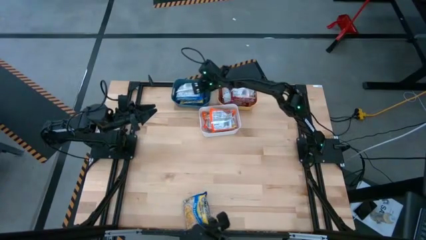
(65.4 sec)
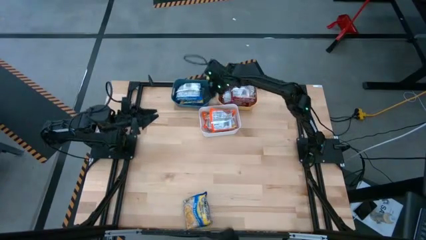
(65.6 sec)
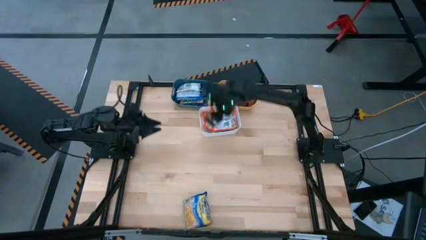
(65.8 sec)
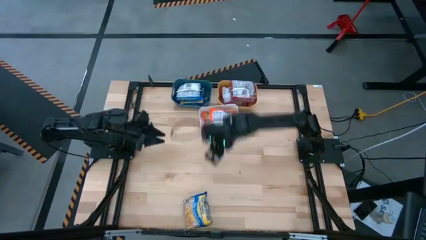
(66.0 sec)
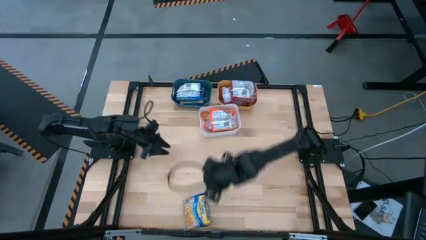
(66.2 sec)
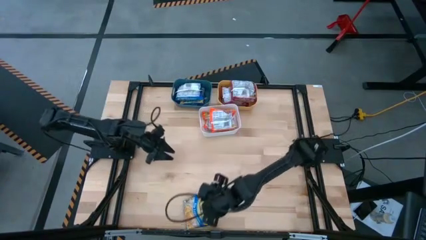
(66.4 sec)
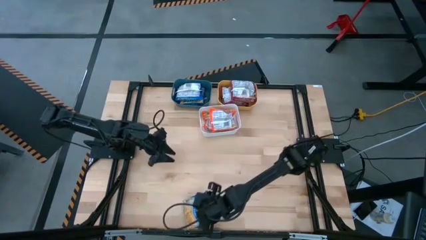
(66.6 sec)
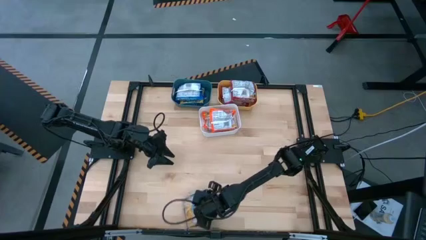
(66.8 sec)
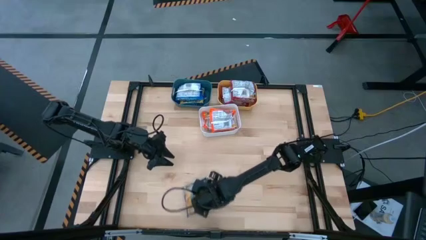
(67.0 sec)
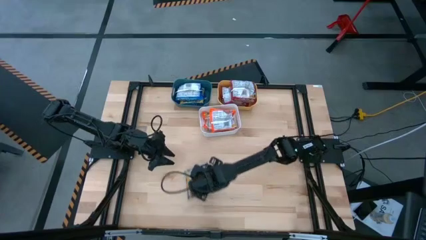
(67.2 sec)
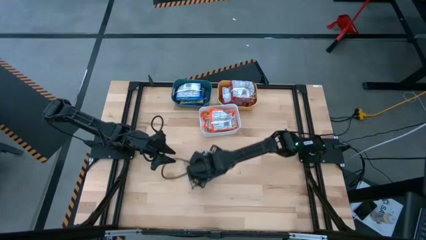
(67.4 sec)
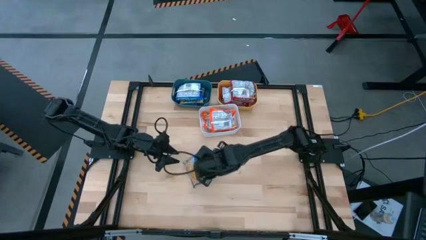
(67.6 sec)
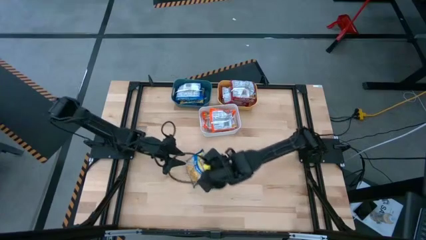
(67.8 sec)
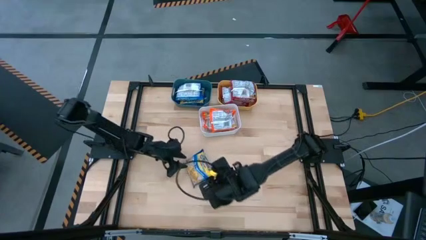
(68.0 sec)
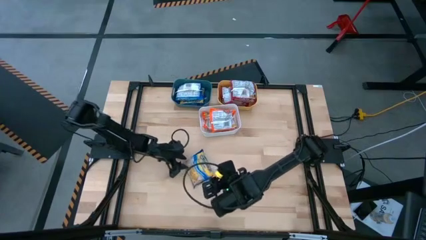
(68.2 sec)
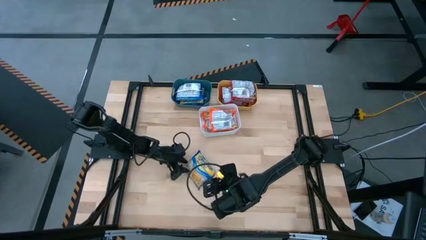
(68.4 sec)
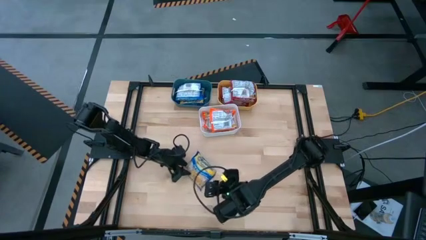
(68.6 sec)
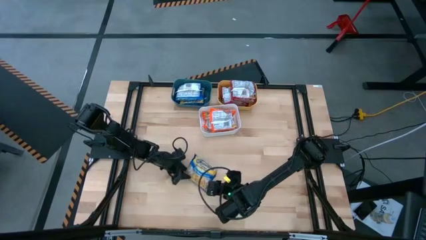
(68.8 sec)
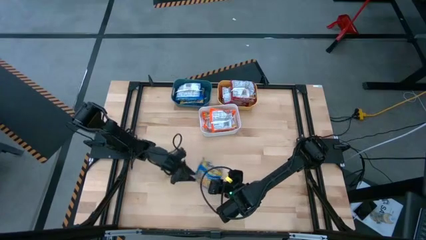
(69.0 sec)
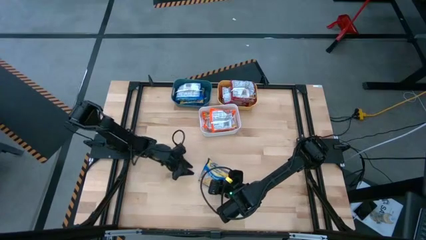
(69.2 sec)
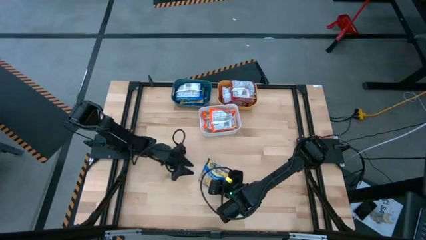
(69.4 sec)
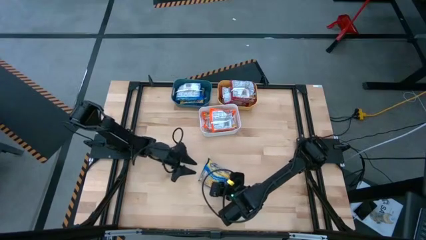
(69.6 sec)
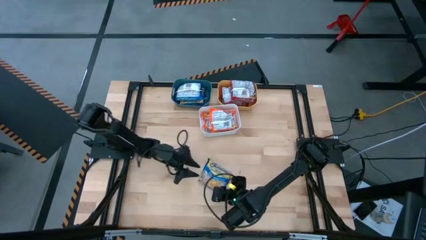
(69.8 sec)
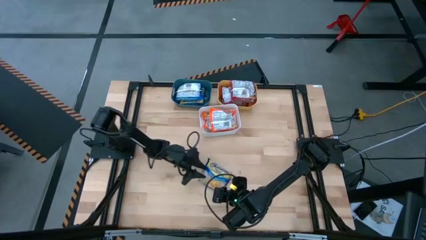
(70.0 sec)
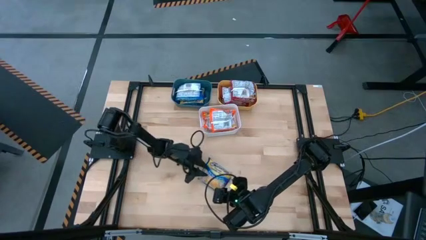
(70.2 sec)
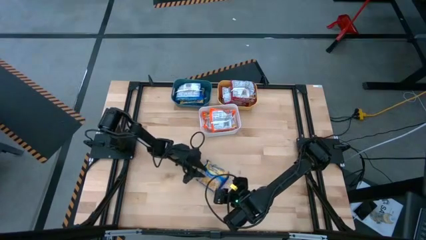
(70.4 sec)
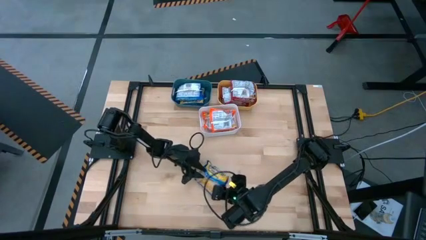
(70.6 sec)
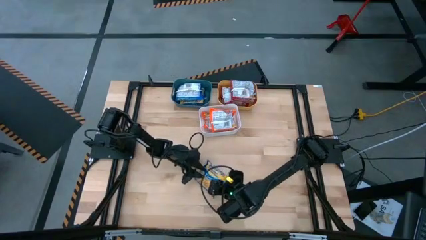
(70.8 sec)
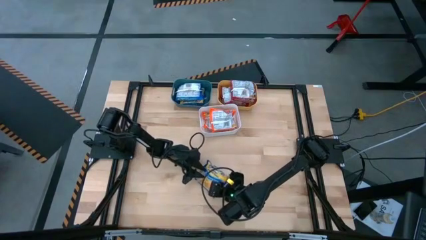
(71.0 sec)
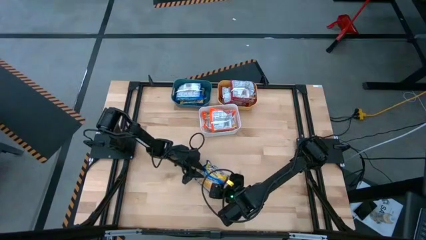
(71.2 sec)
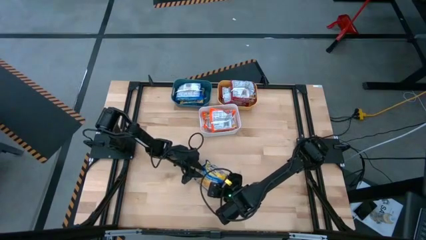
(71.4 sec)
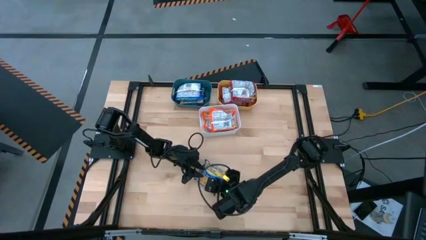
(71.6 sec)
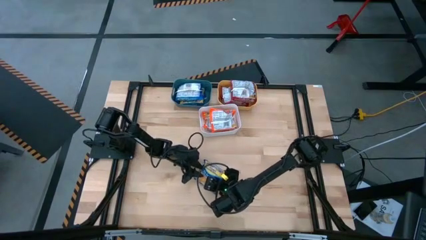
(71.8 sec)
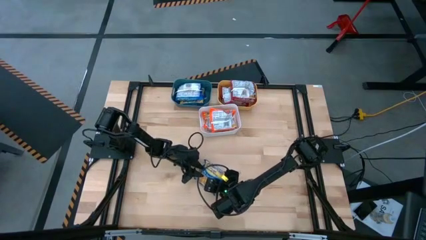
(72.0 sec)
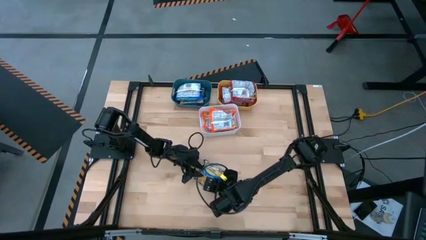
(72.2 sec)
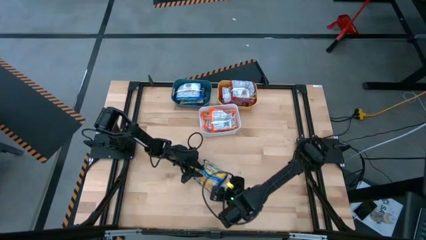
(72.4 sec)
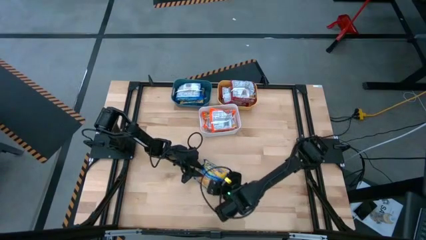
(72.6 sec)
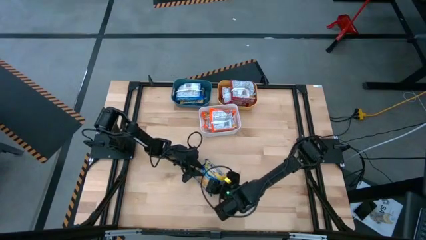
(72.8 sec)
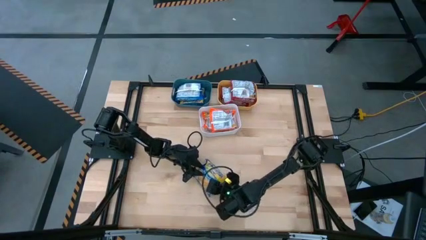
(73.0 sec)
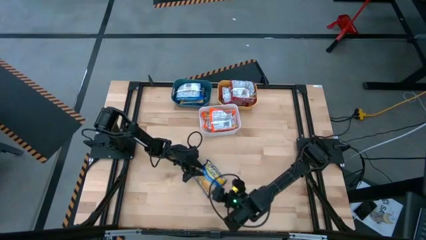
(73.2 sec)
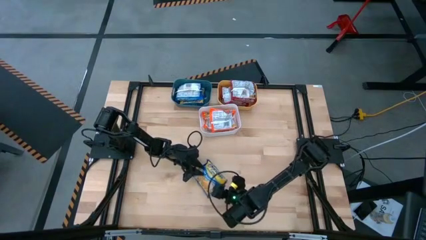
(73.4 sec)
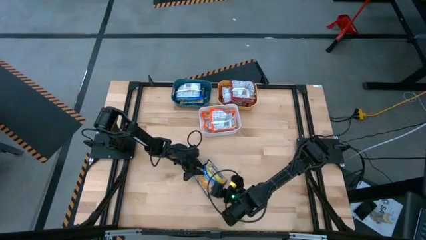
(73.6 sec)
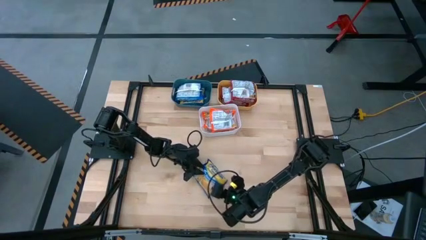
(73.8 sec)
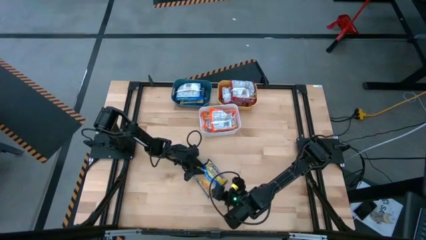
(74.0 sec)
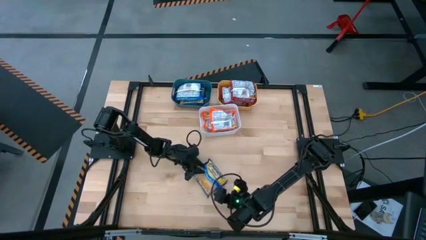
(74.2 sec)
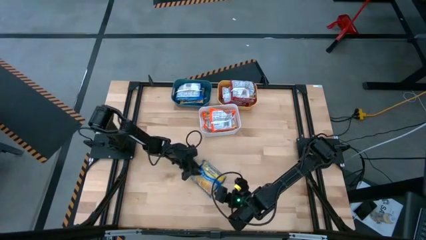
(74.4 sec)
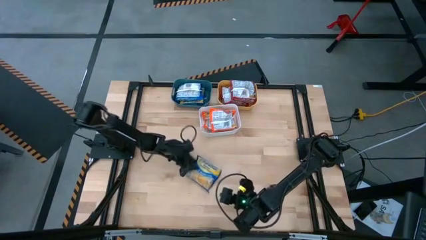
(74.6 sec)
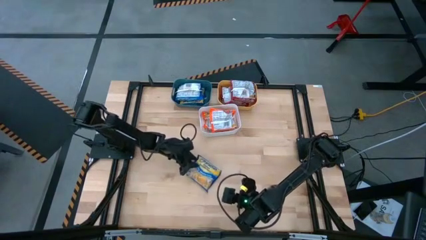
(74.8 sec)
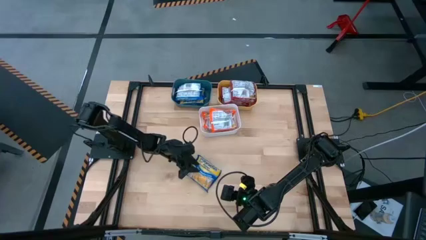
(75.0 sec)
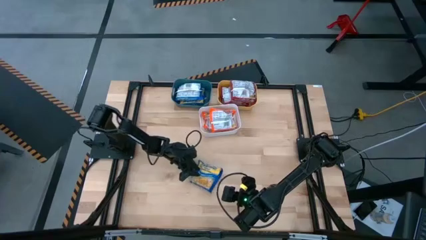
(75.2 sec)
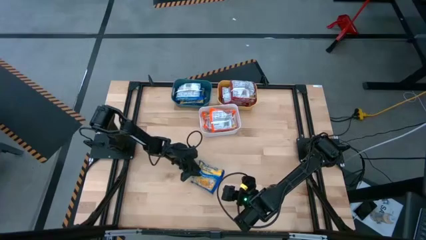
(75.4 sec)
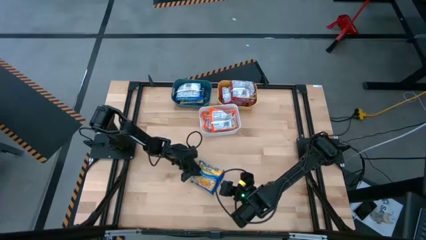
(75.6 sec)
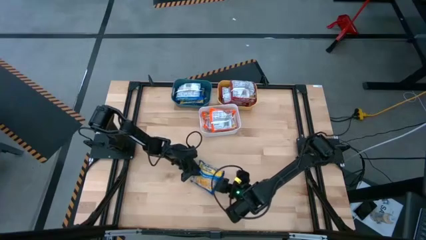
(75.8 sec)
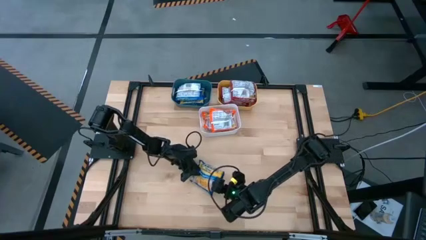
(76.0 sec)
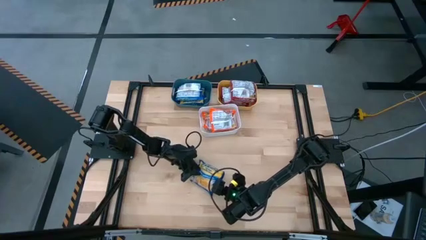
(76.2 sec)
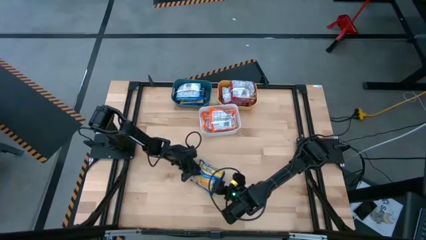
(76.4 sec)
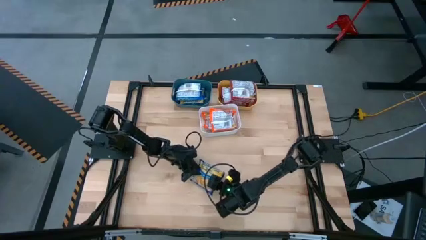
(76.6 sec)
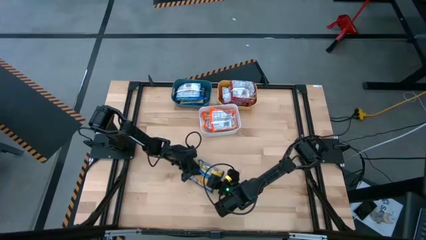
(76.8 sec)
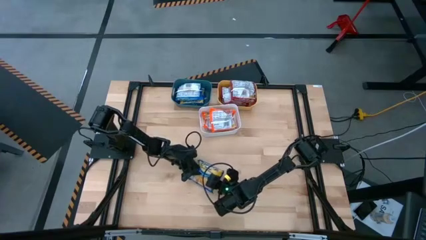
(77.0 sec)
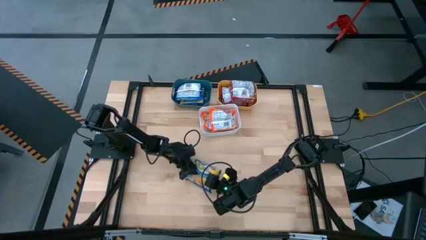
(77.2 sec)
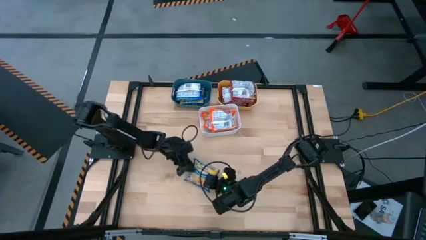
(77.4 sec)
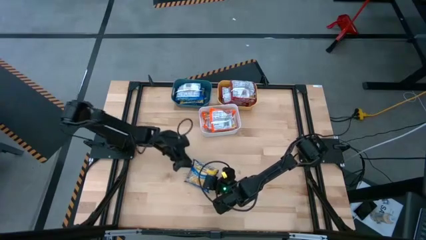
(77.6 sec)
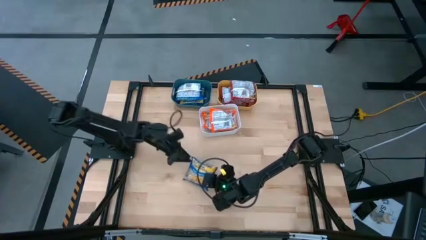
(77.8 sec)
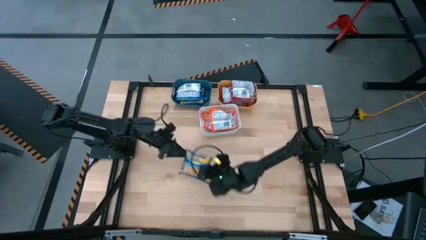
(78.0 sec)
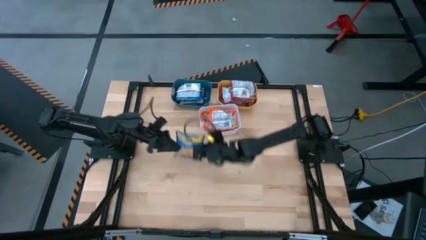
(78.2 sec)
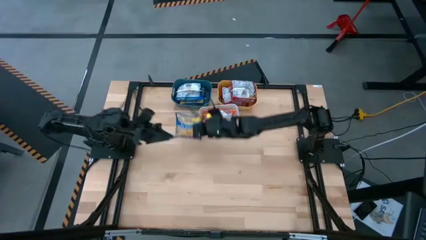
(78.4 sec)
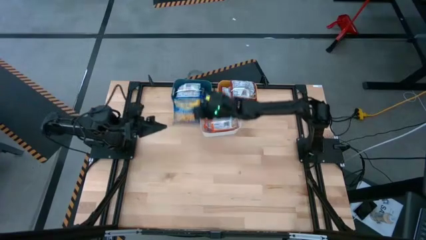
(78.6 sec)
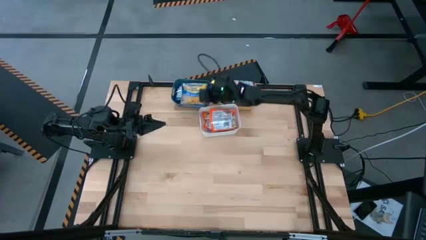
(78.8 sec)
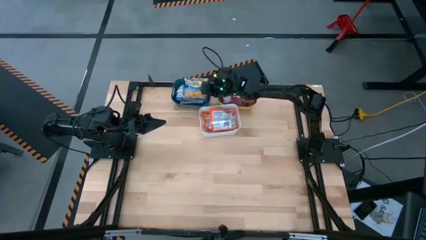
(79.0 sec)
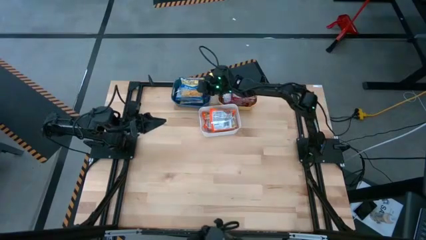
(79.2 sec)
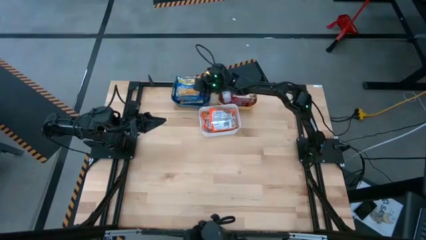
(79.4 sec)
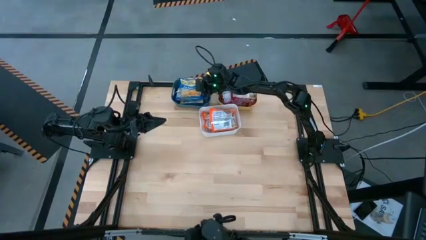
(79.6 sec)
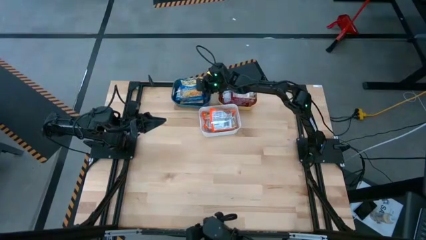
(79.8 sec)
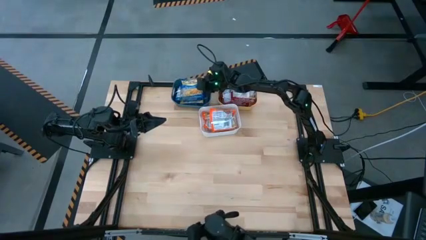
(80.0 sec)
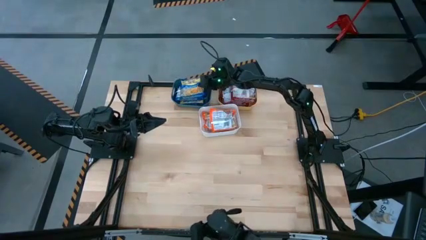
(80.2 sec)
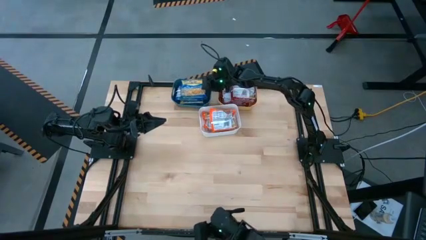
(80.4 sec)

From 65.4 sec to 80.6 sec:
Task: Sort Maruchan noodles
Put the blue noodle pack into the blue bin
